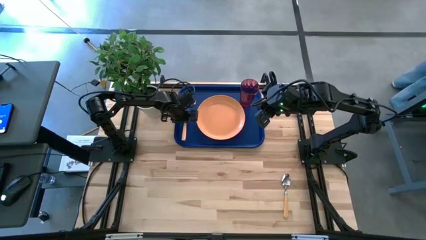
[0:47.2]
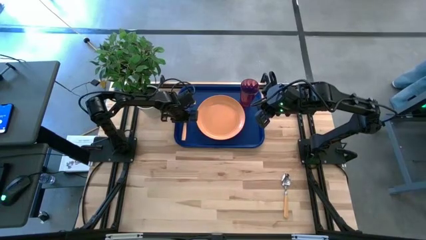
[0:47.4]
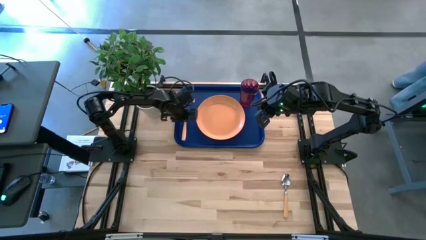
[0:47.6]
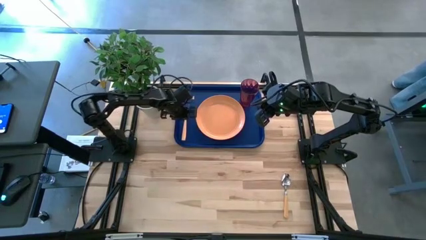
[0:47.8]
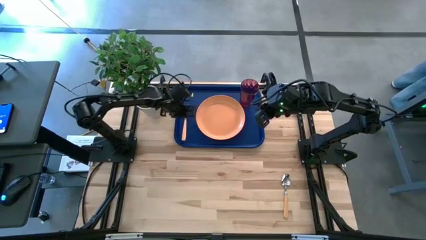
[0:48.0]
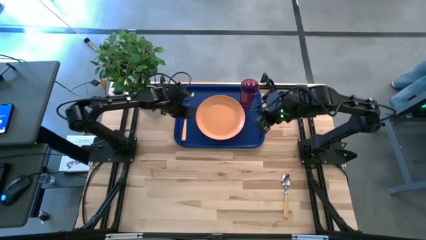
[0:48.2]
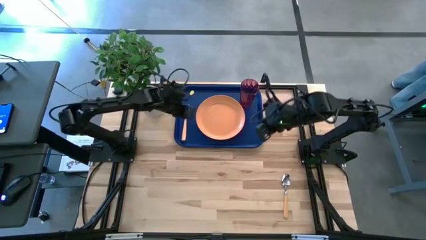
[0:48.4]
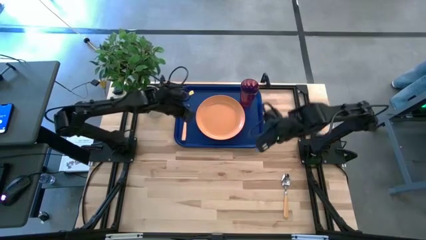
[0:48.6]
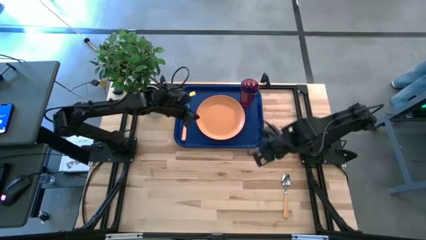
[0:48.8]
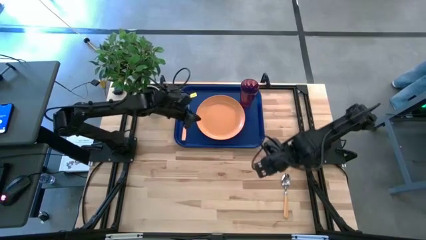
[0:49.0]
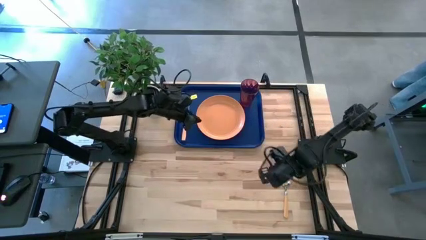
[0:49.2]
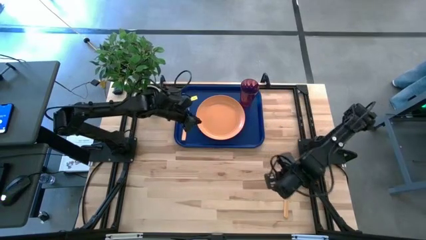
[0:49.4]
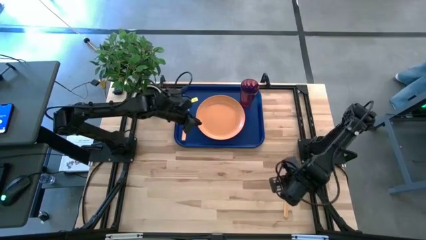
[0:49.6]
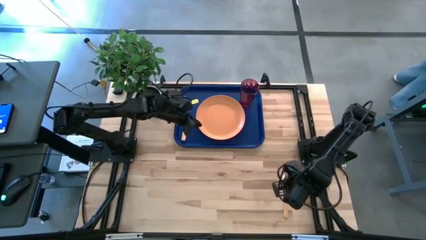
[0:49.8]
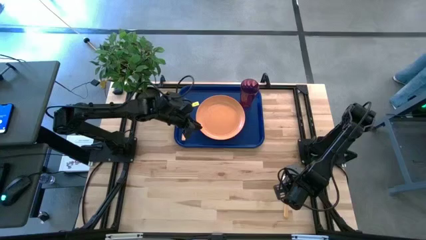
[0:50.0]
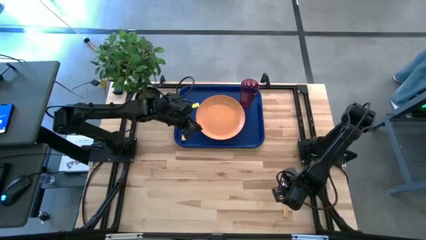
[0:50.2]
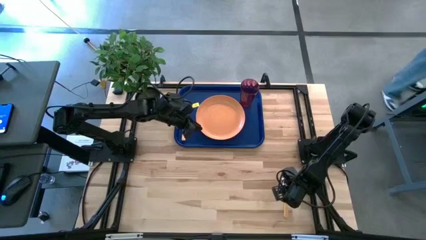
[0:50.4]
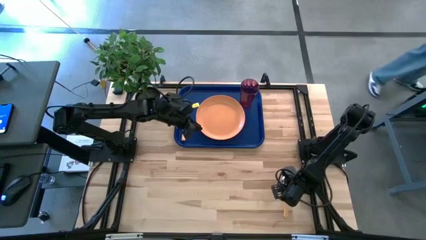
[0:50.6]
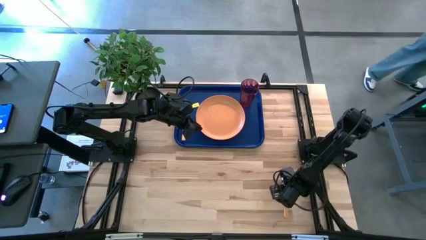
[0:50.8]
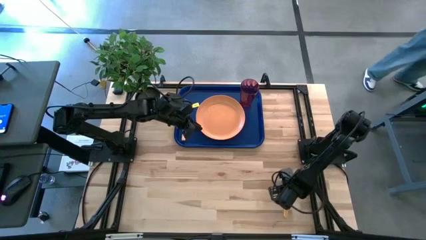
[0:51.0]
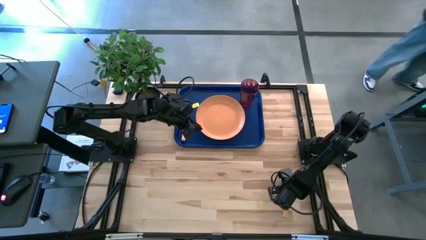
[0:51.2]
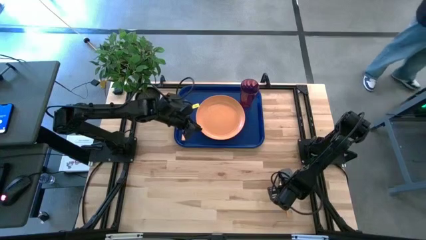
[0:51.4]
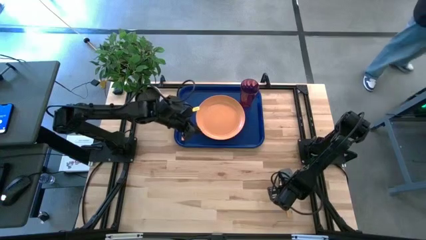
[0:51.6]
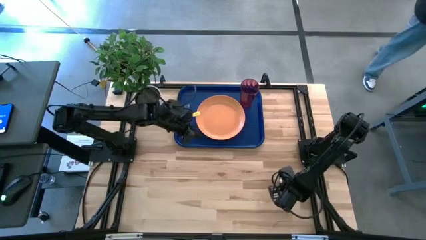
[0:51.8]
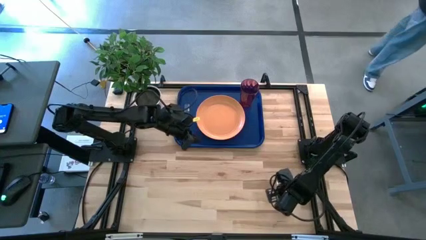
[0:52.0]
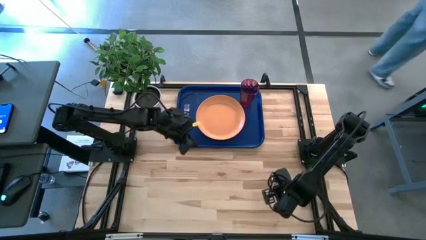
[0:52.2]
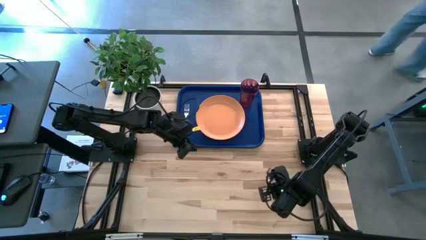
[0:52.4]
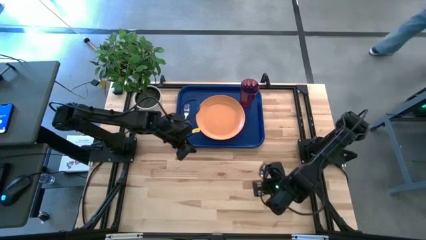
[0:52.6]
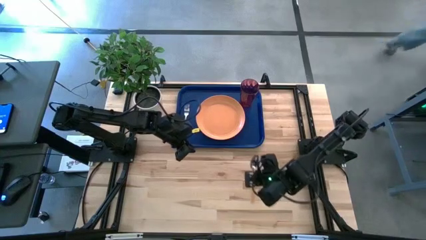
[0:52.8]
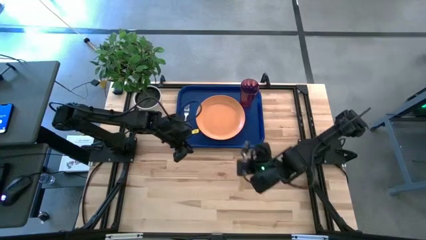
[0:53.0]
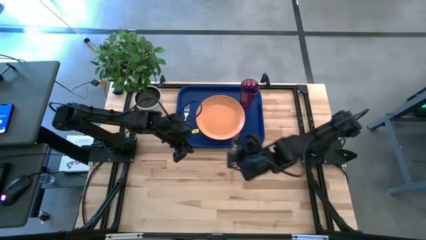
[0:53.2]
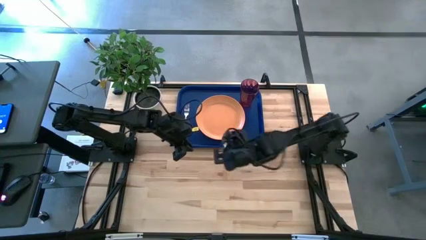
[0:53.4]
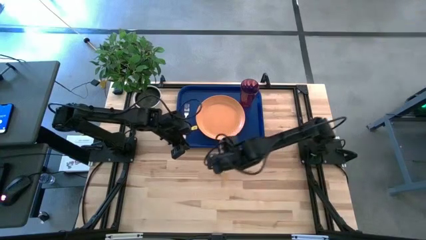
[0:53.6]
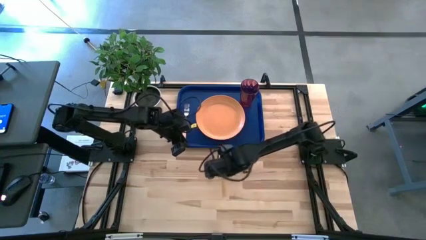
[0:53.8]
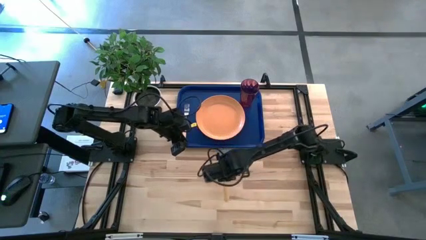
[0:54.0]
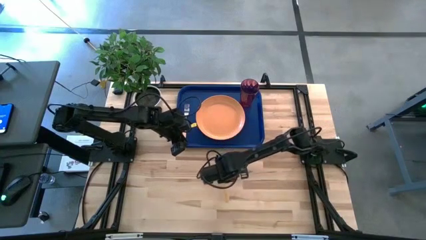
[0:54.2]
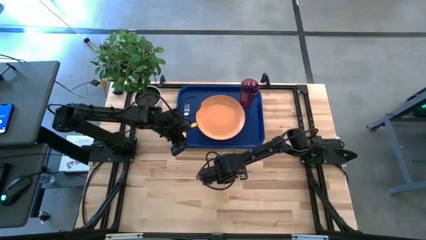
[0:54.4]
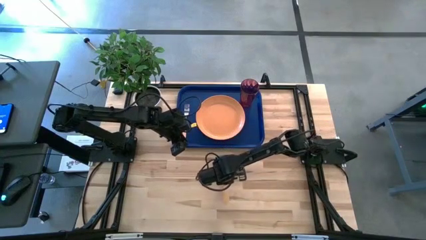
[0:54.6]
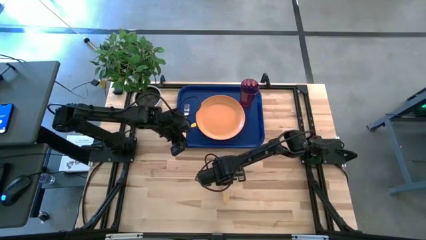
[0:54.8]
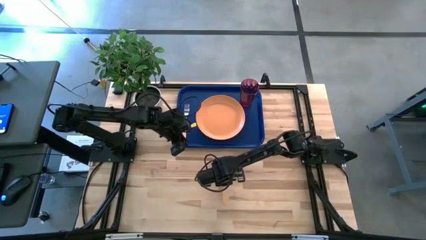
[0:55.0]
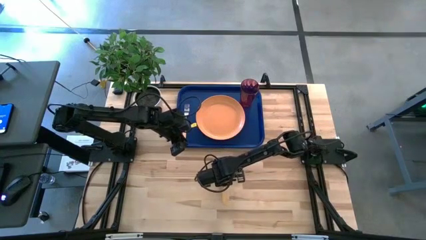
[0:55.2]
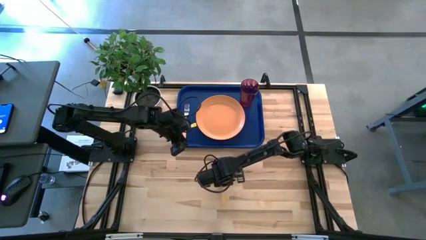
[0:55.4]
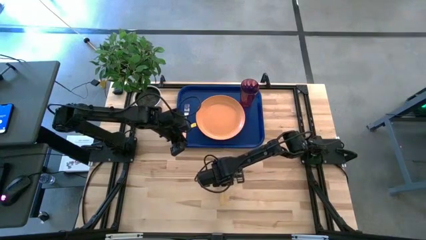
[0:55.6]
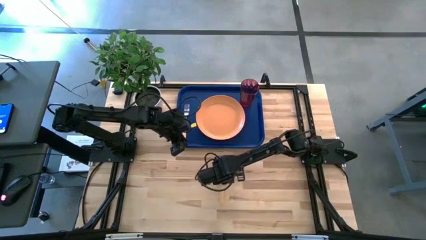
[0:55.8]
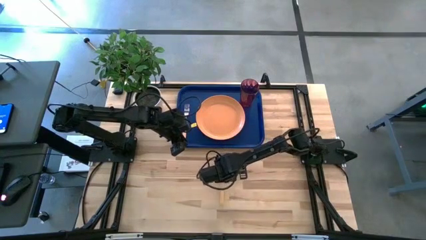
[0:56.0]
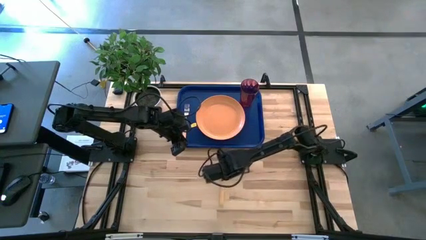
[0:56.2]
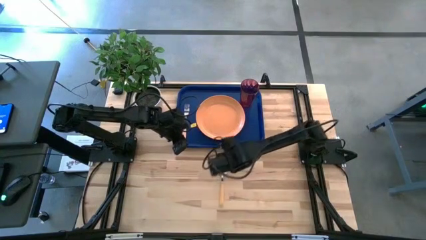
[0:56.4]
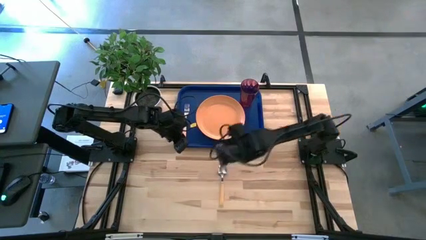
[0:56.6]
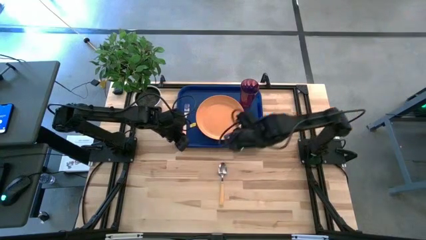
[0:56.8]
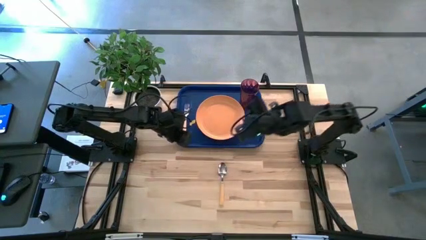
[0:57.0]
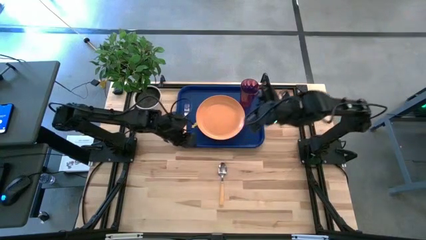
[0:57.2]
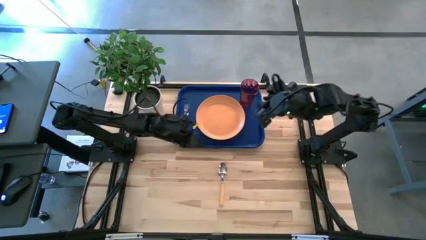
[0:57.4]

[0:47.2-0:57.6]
Task: Pick and place plate/cup/fork/spoon on tray
Put the spoon on the tray to the left of the plate
